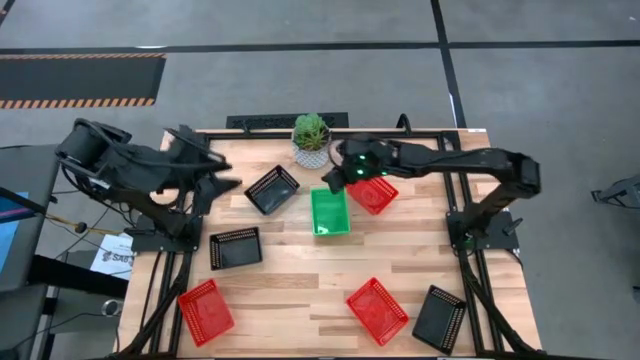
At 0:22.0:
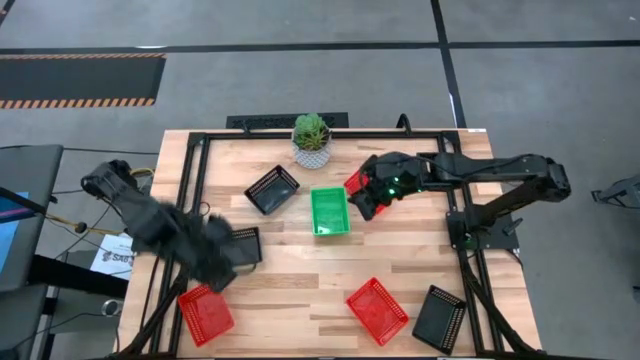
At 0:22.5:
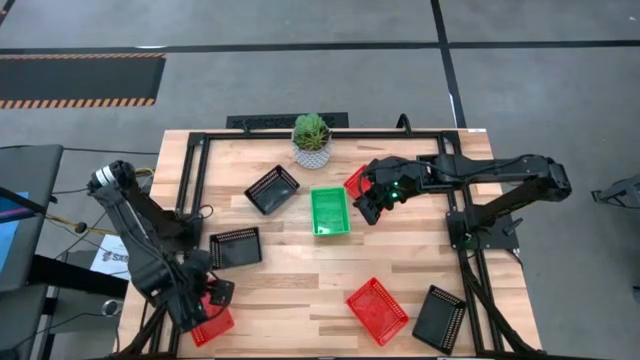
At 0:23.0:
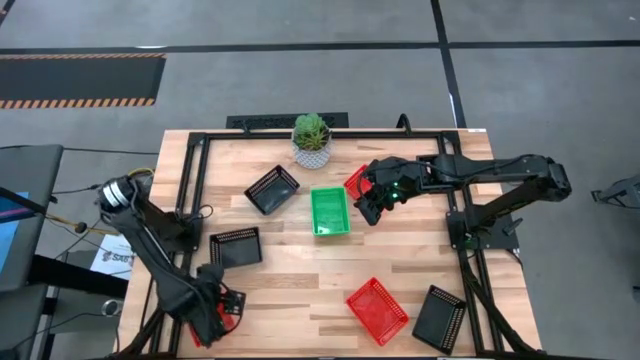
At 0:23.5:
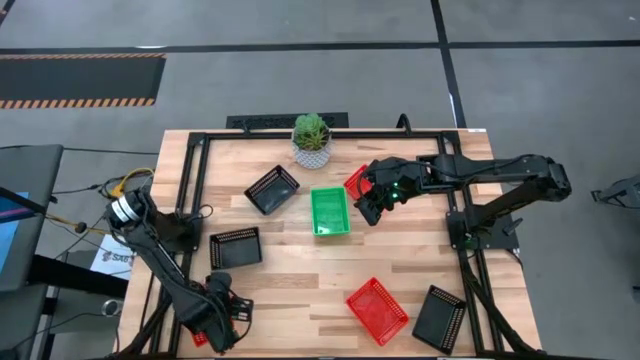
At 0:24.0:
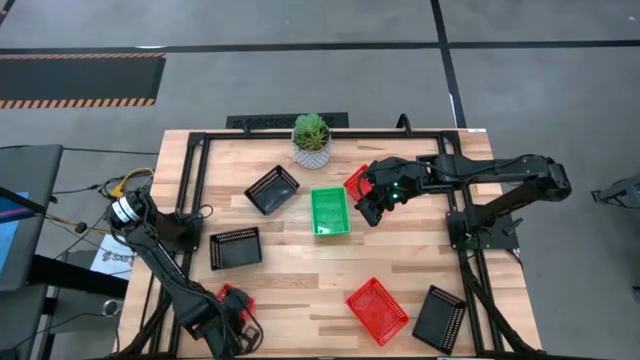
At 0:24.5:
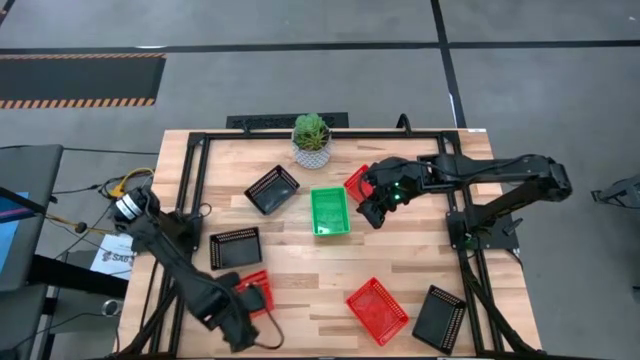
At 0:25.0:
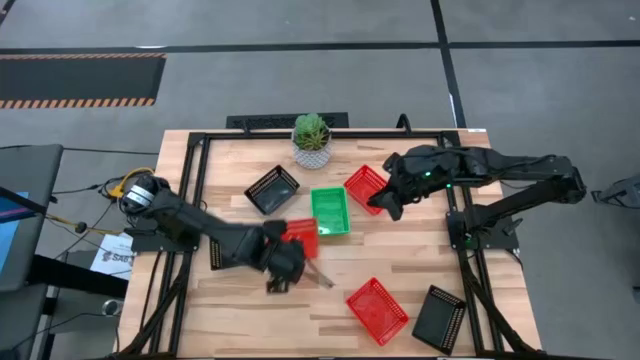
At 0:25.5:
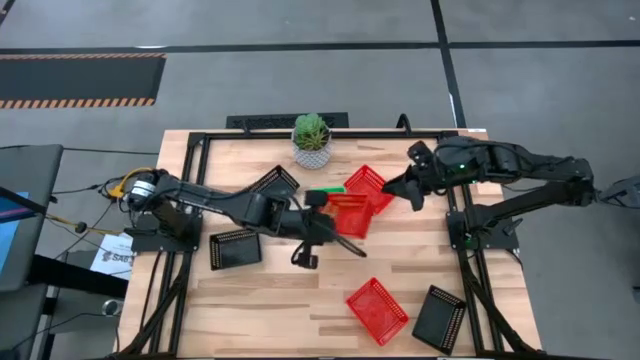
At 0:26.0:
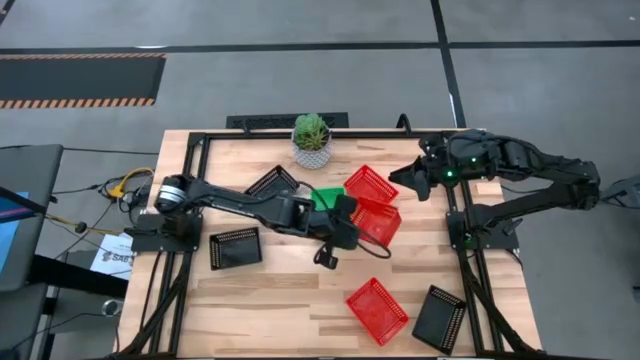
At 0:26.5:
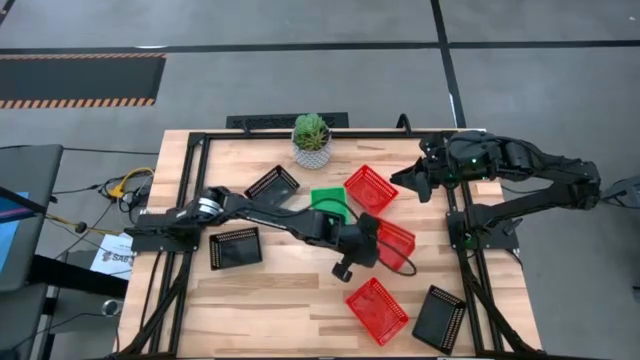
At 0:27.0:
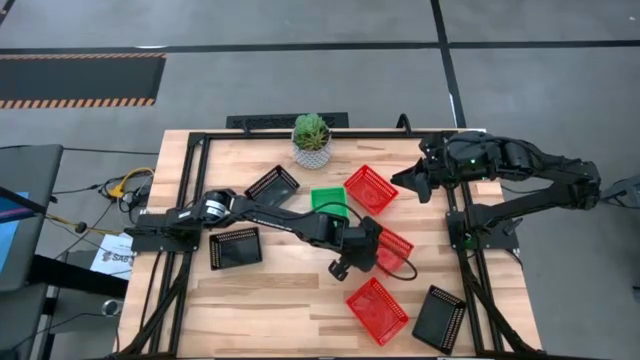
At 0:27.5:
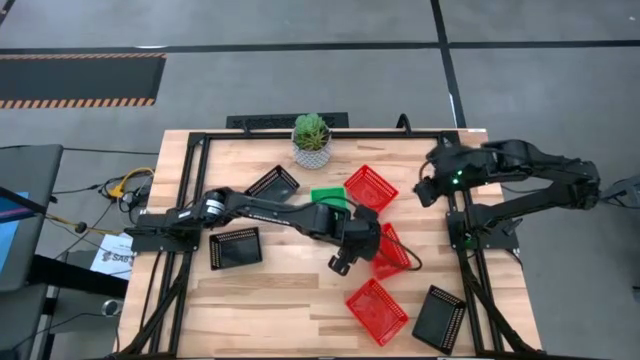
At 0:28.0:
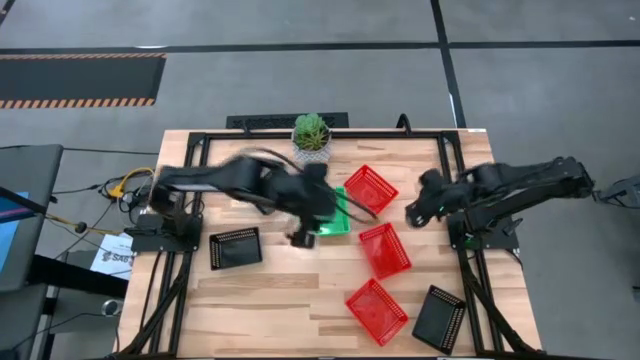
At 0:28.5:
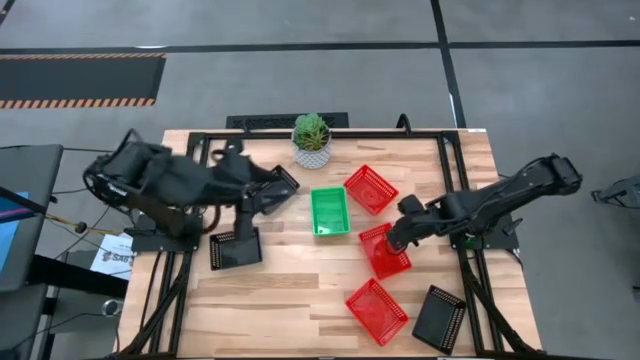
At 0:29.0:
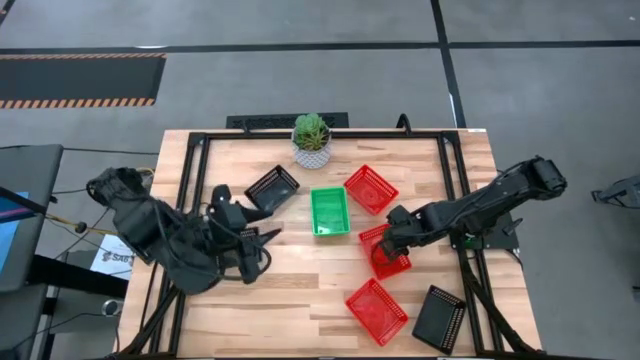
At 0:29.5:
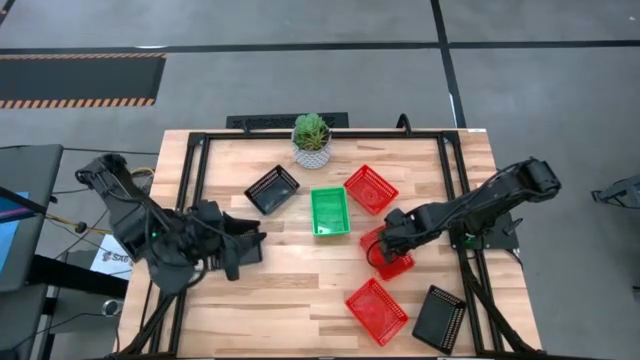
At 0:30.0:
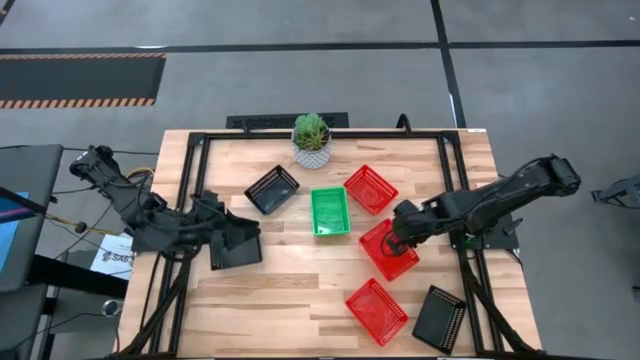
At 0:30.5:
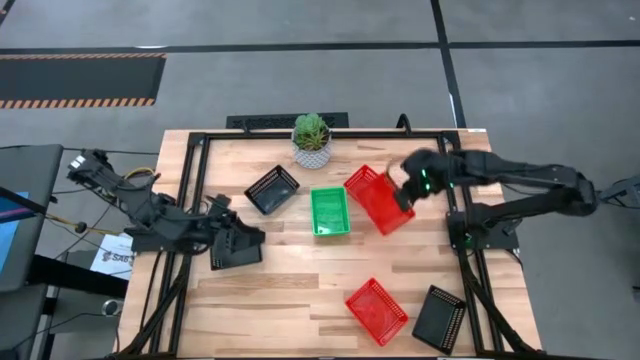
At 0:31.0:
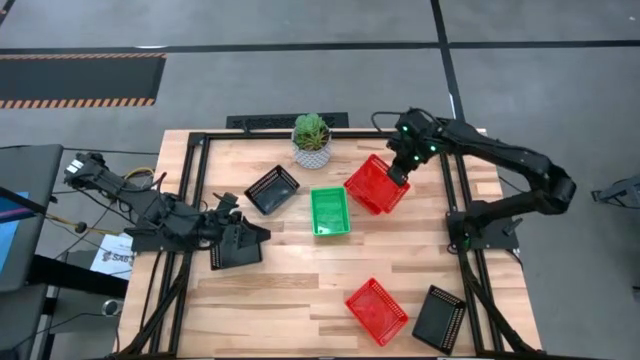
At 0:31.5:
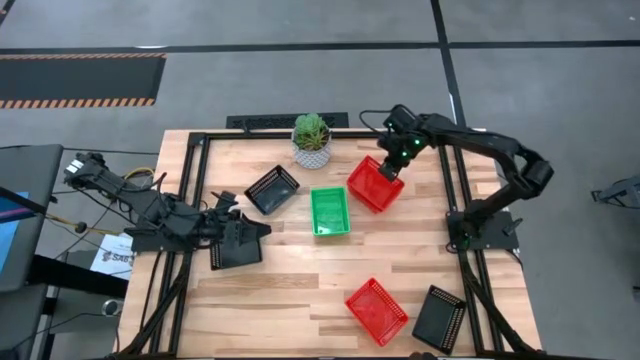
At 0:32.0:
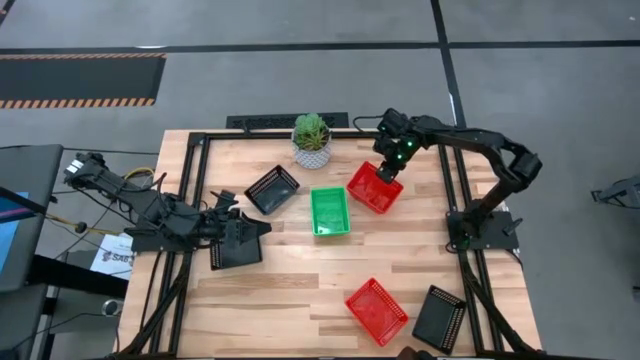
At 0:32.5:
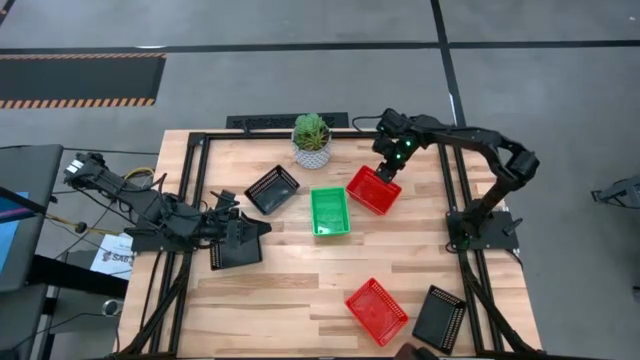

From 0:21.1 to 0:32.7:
Stack the bottom left red bin on the top right red bin

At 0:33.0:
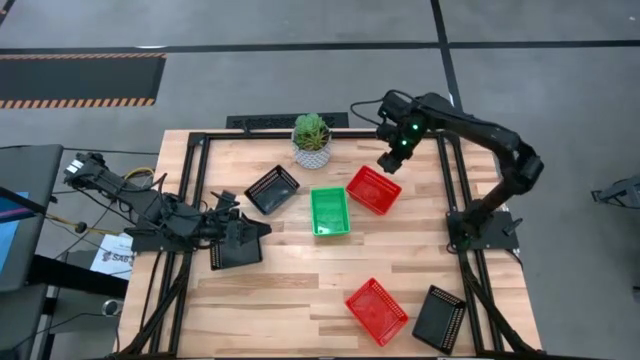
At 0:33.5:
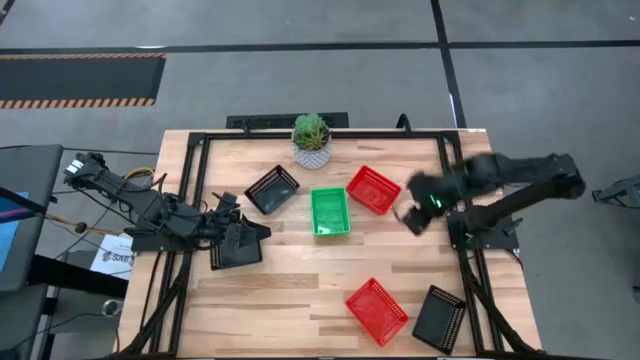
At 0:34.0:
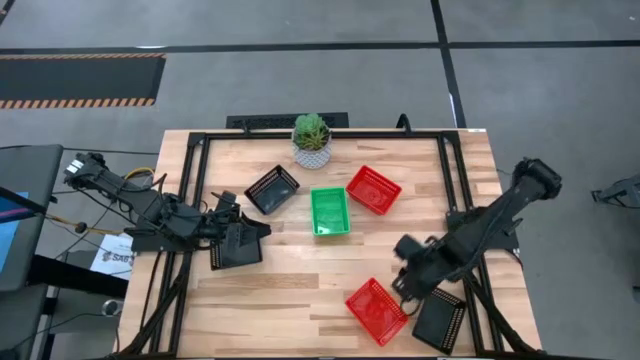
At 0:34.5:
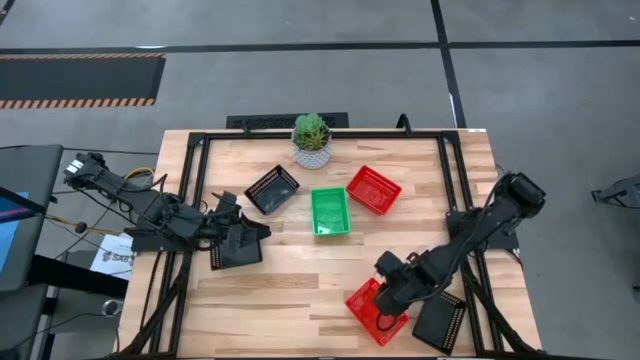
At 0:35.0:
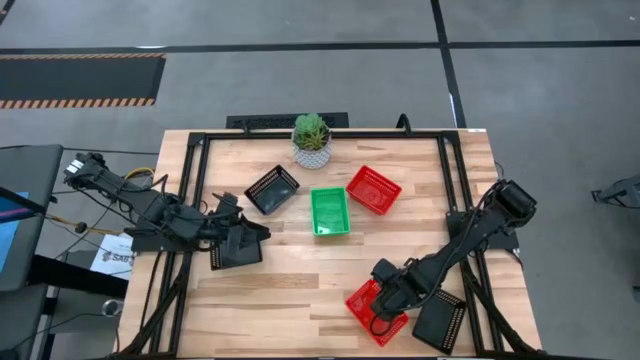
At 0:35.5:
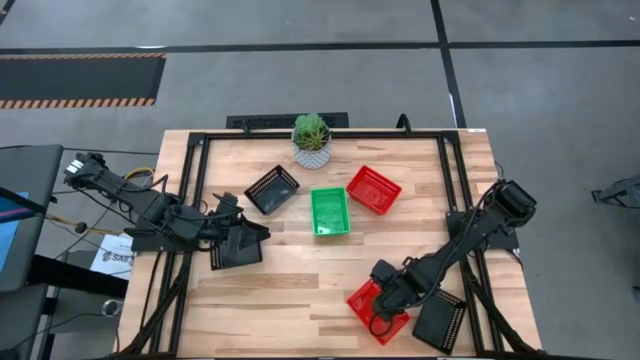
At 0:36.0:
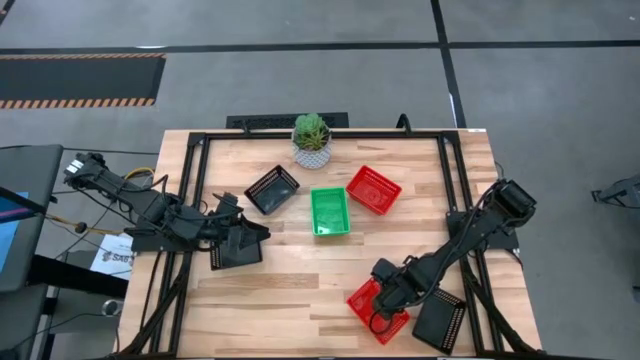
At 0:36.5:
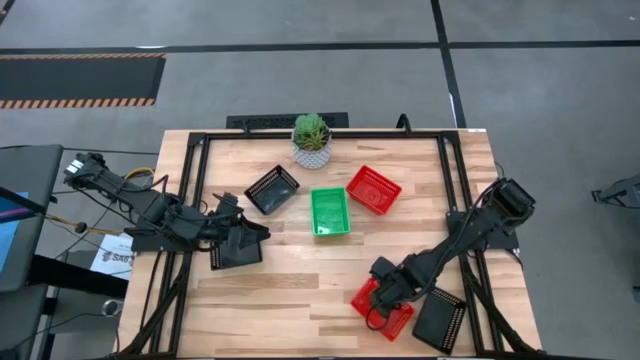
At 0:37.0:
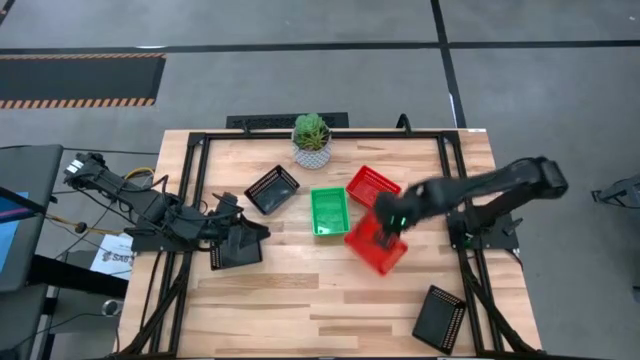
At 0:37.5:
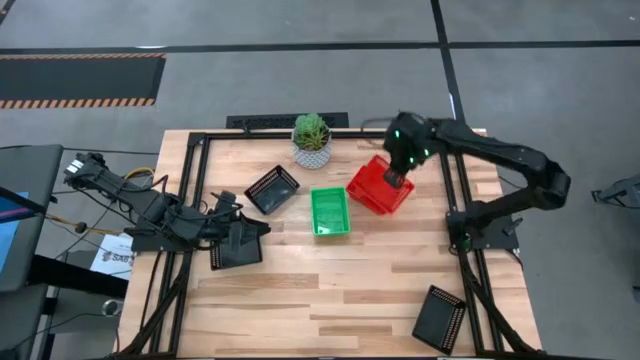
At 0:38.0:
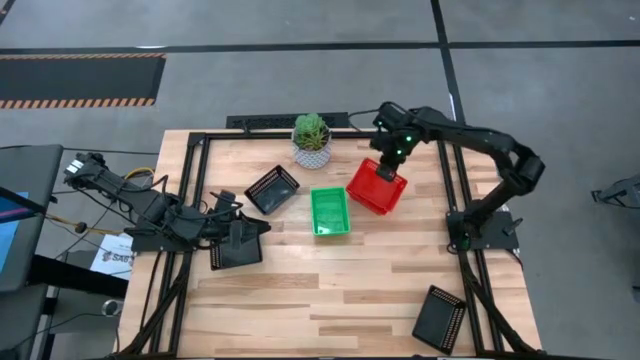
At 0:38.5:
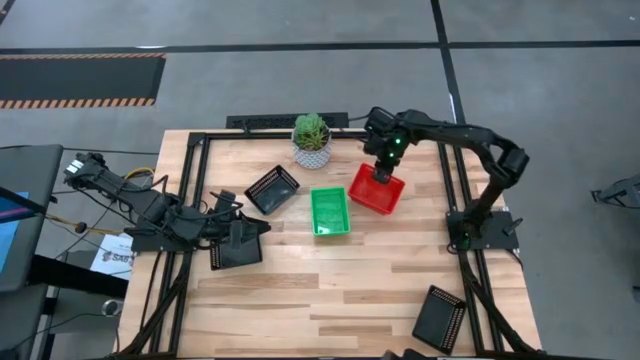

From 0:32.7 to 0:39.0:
Stack the bottom red bin on the top red bin
